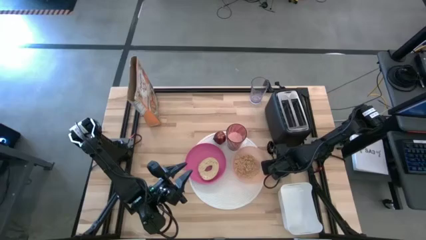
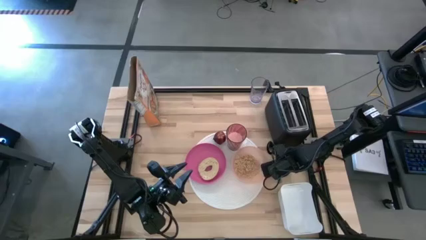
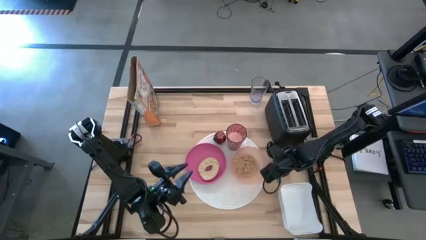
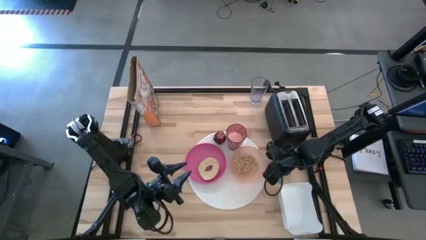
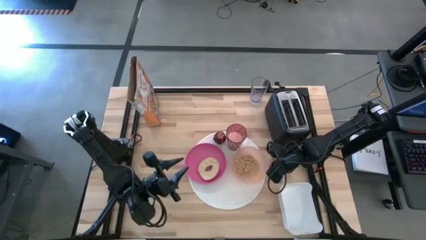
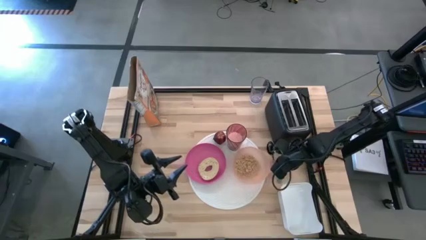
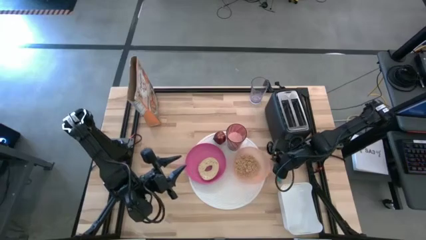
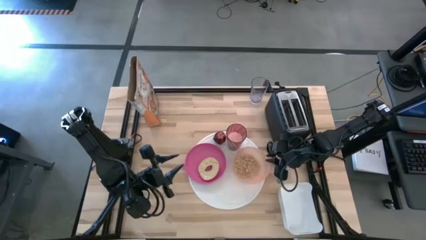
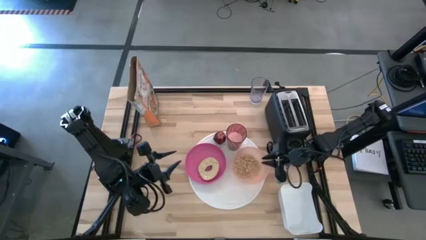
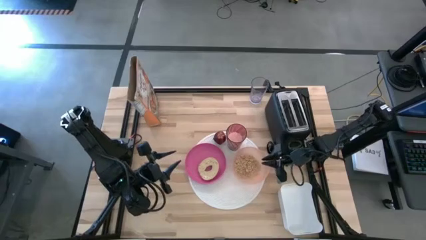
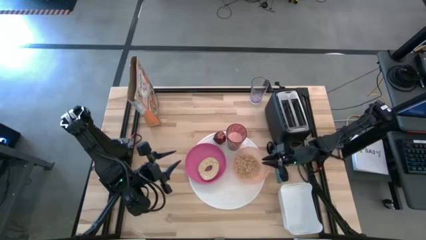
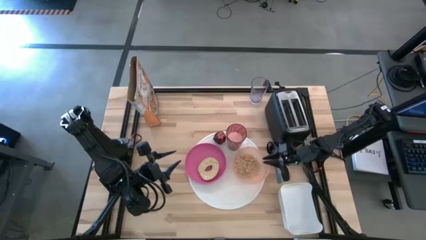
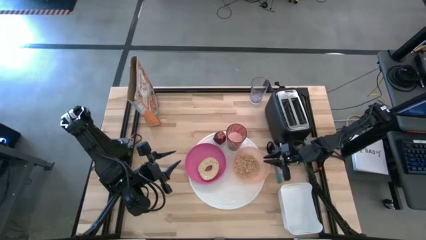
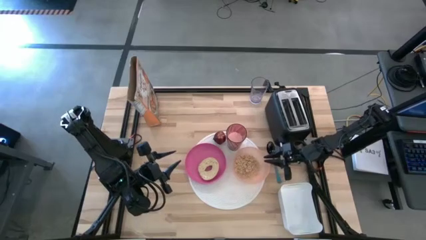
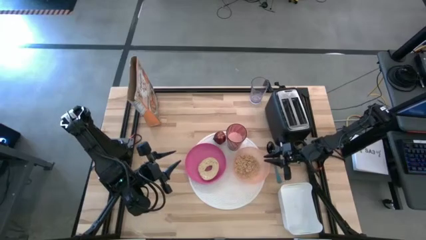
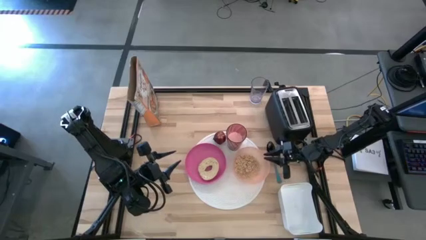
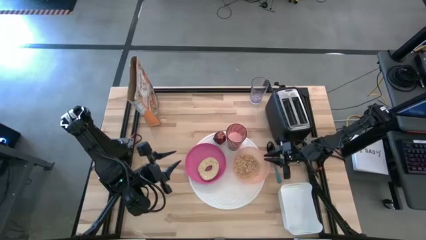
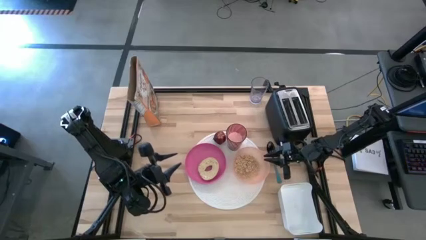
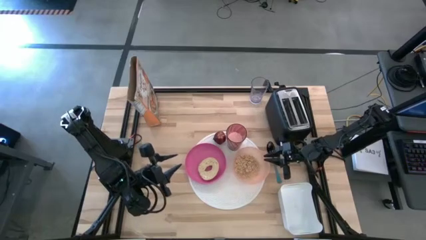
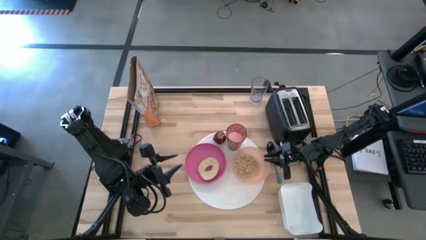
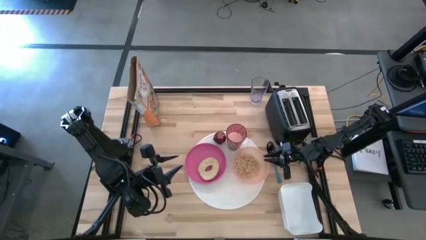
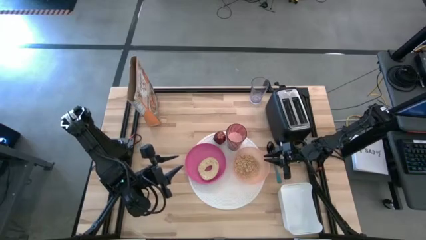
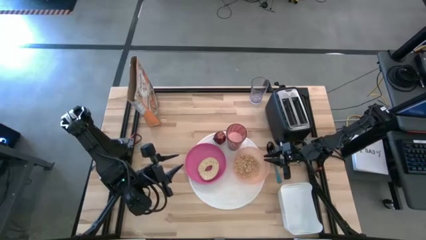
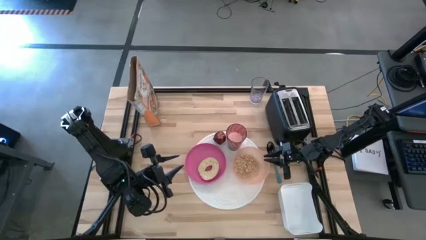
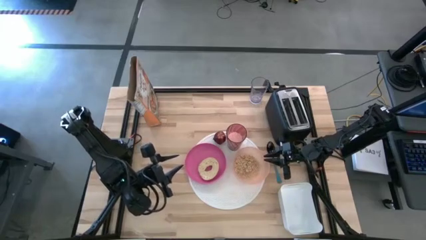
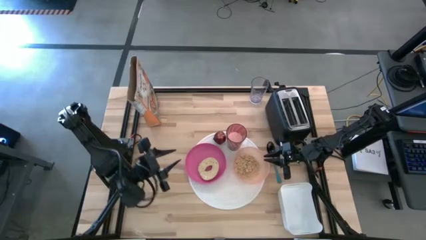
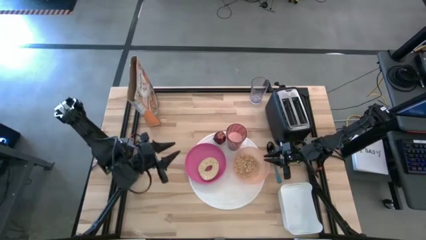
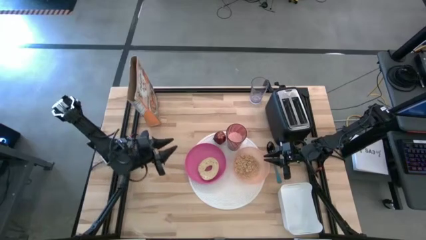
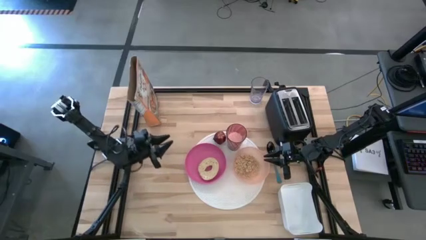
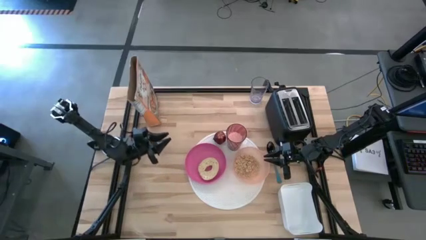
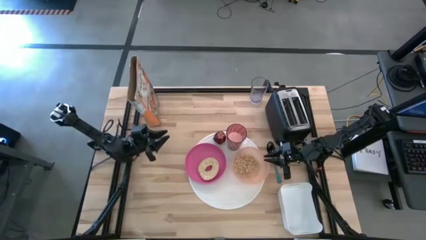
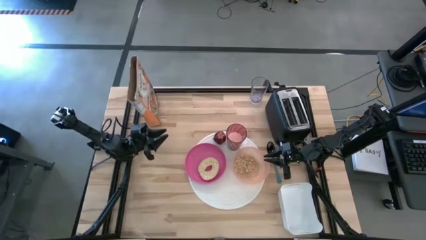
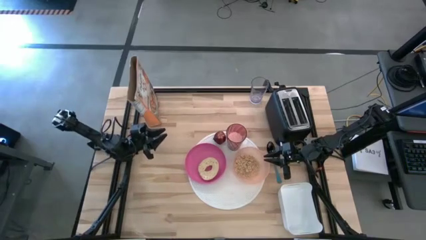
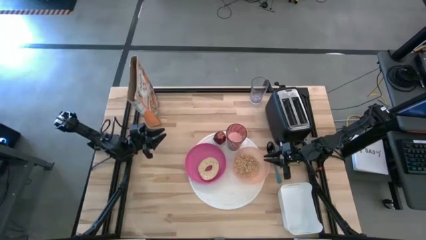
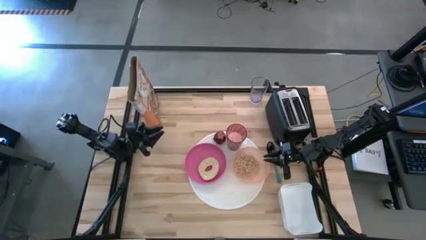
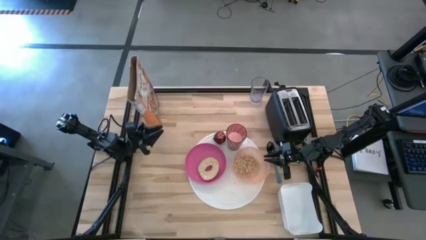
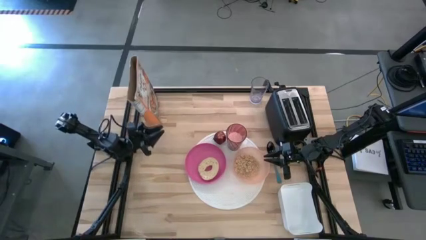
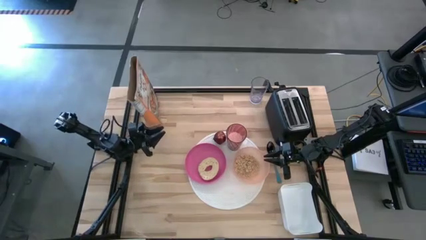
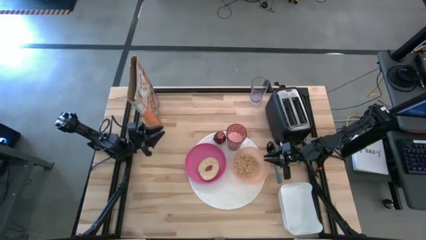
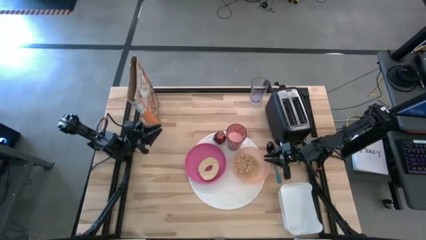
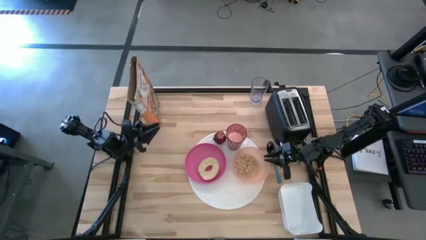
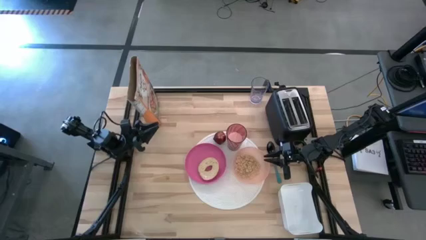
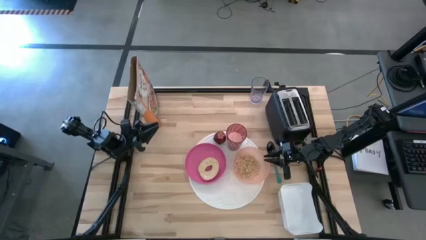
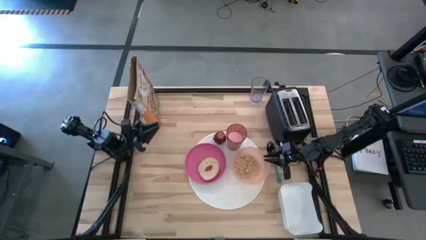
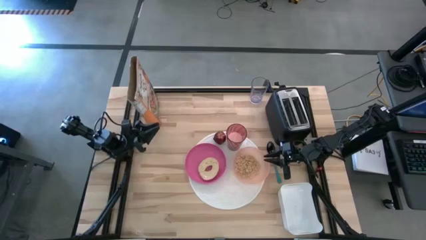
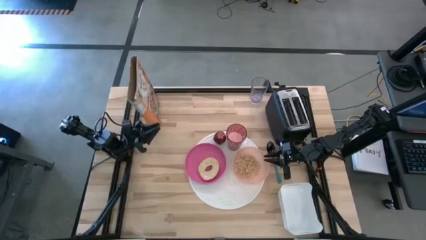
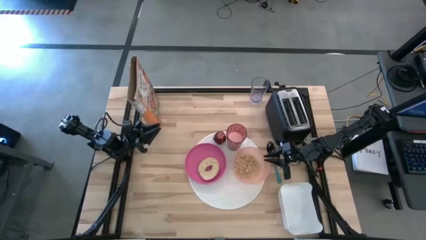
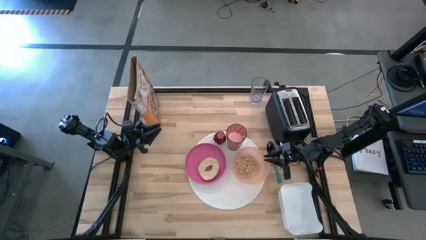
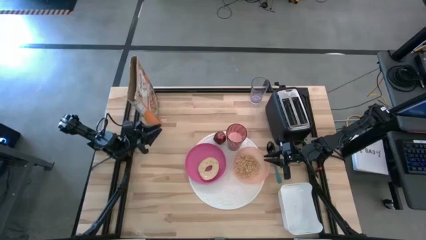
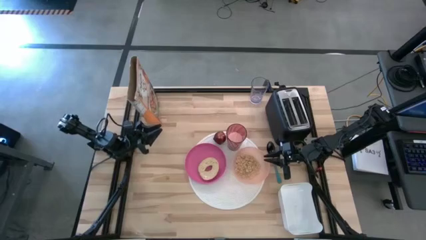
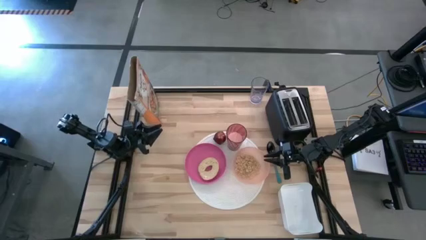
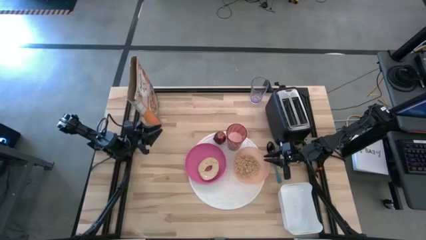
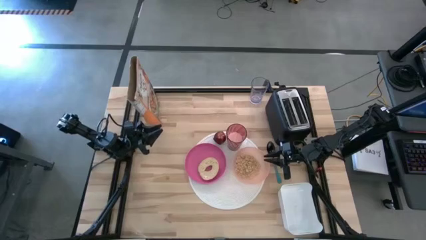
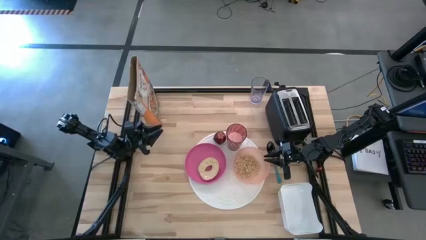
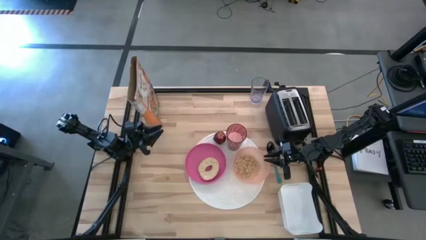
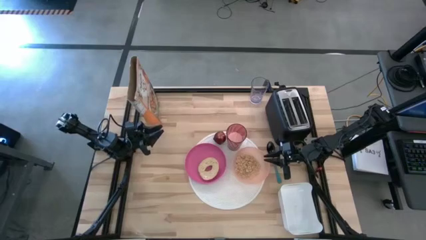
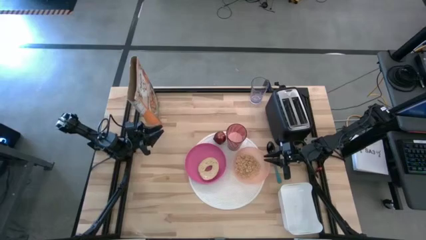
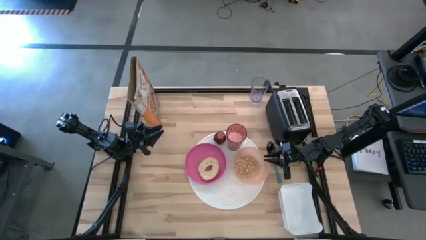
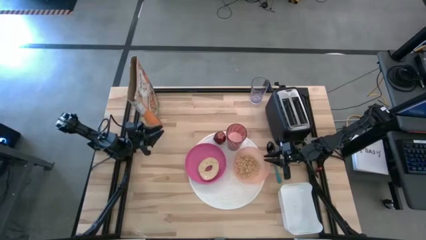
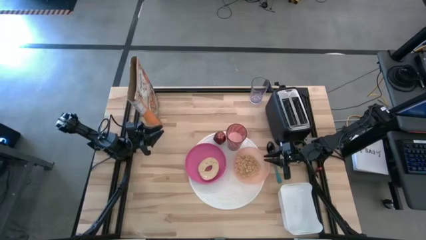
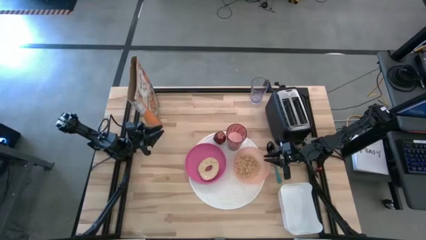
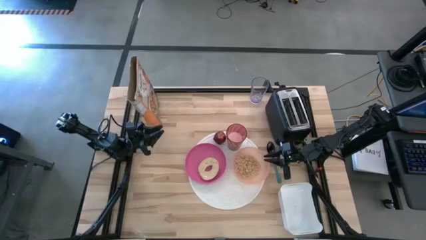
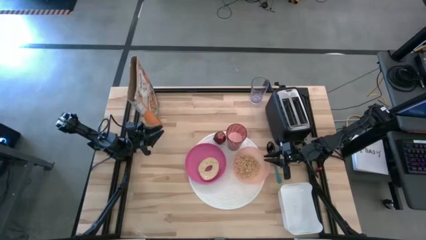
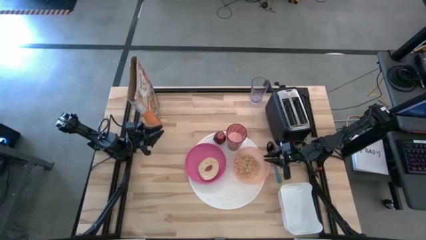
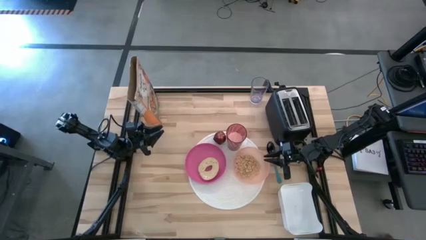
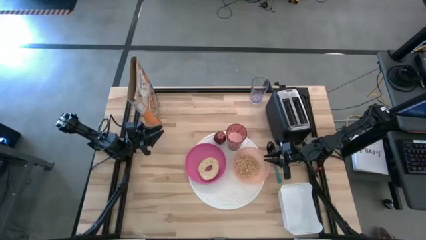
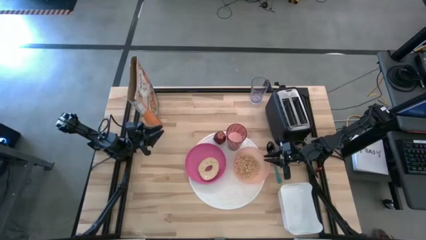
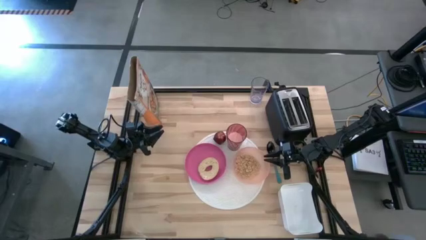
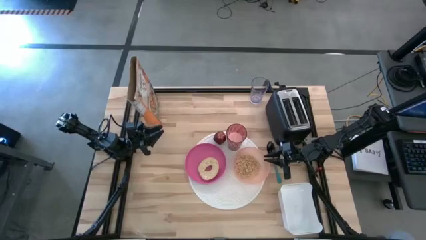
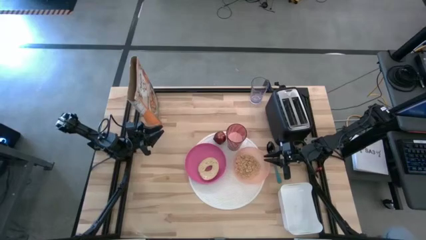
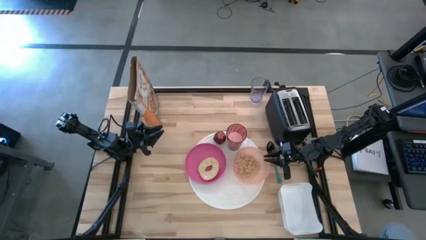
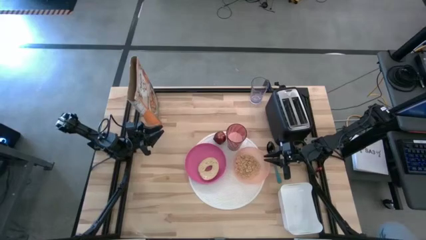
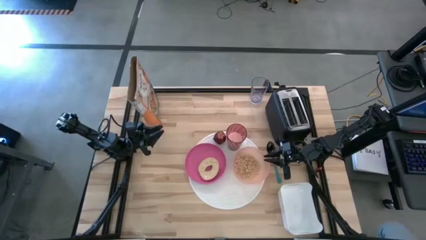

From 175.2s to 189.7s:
Task: Arrange a breakfast setting
Return to Home Position
